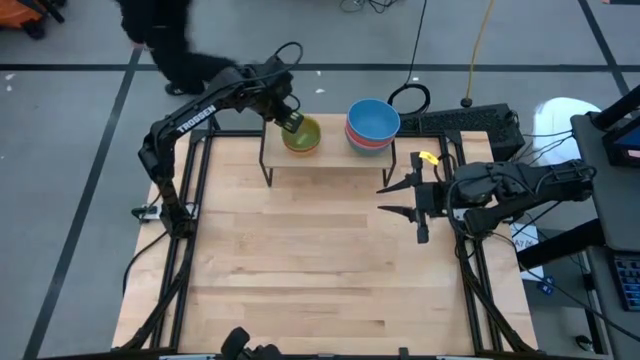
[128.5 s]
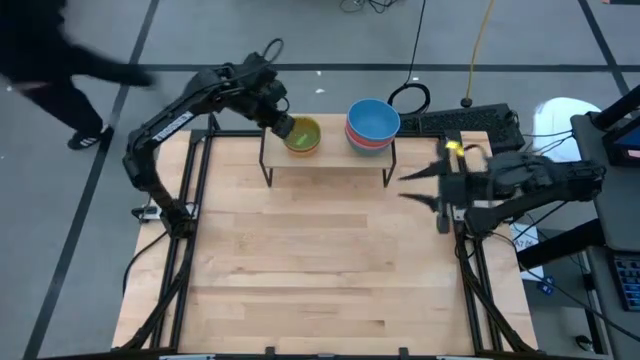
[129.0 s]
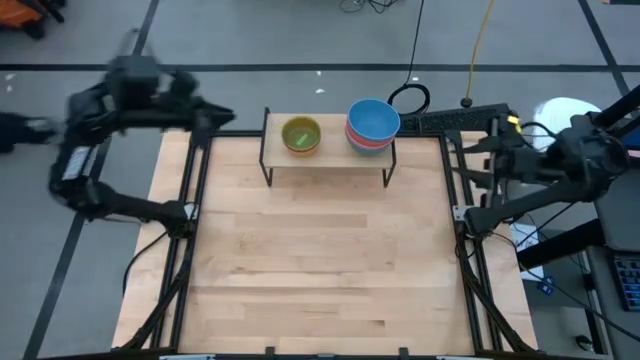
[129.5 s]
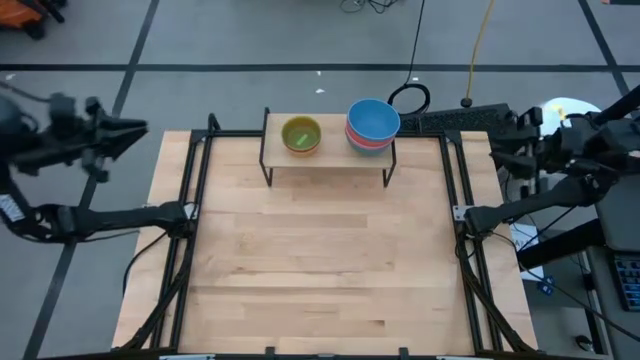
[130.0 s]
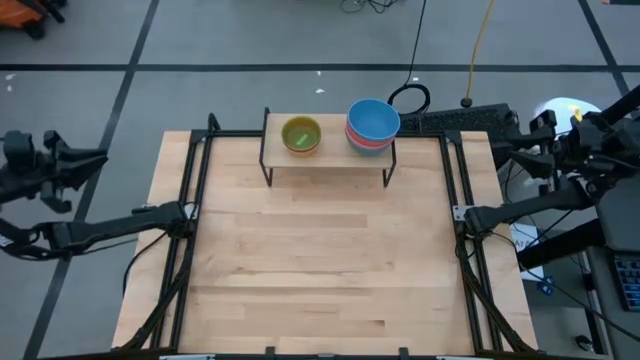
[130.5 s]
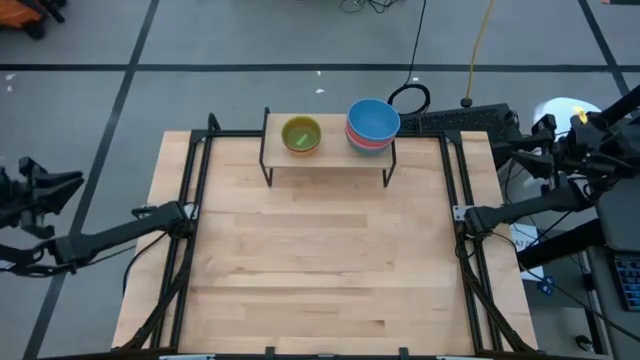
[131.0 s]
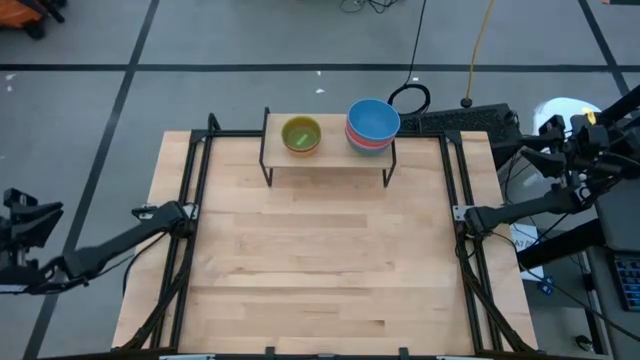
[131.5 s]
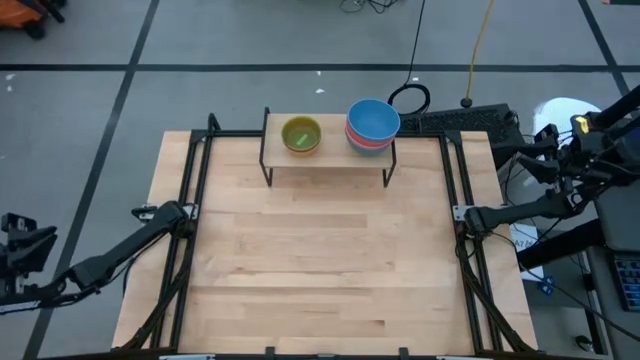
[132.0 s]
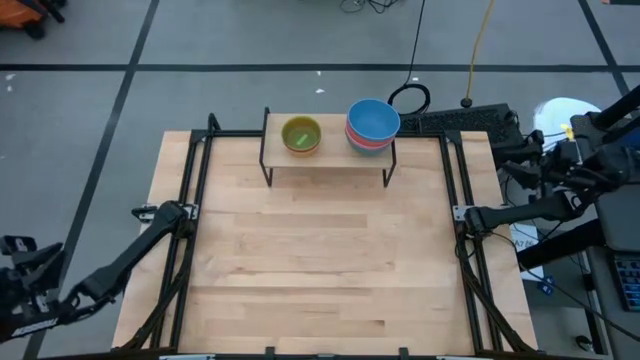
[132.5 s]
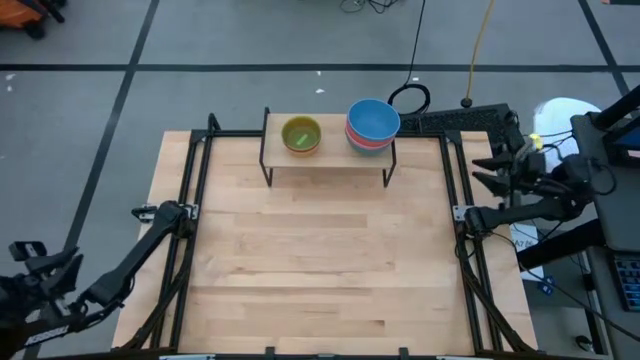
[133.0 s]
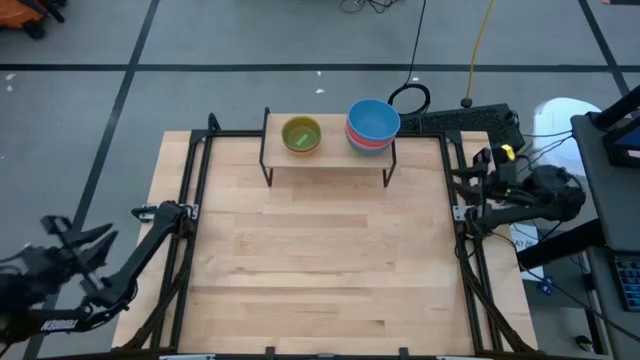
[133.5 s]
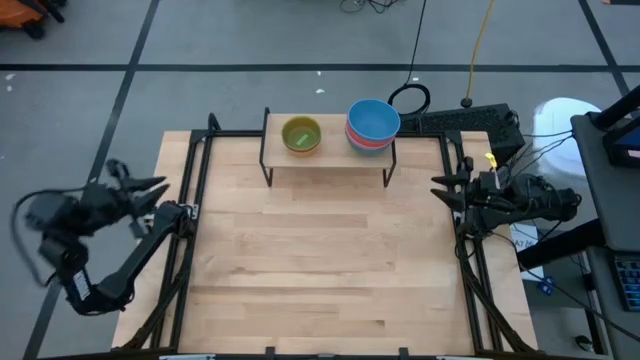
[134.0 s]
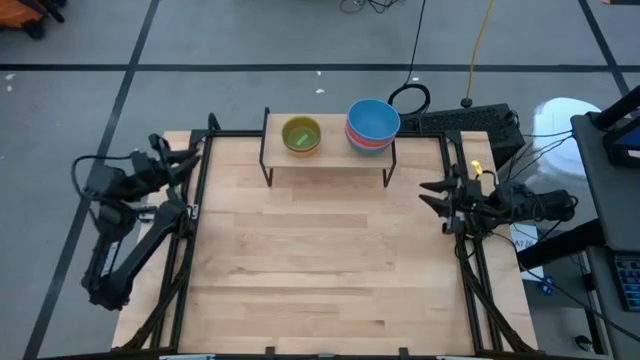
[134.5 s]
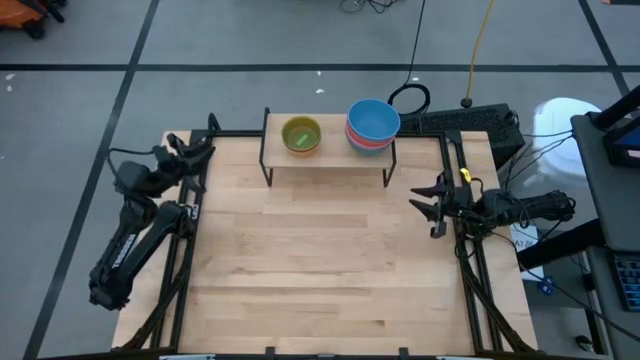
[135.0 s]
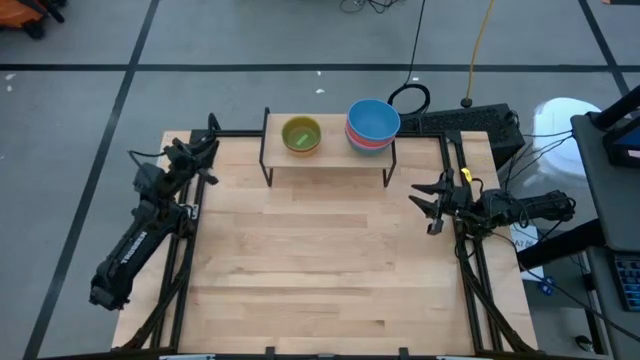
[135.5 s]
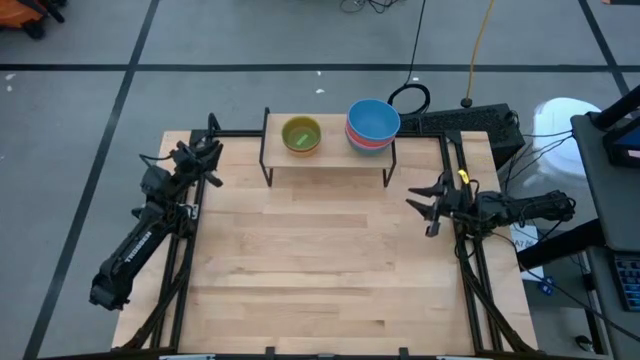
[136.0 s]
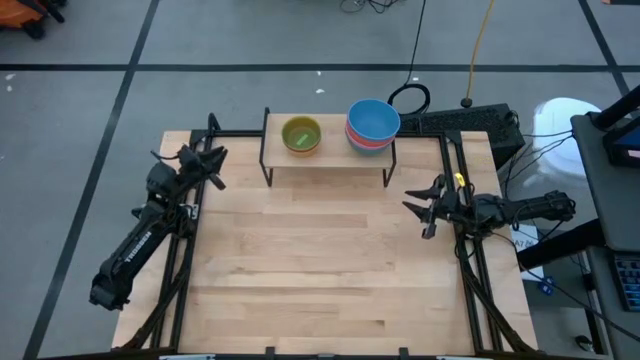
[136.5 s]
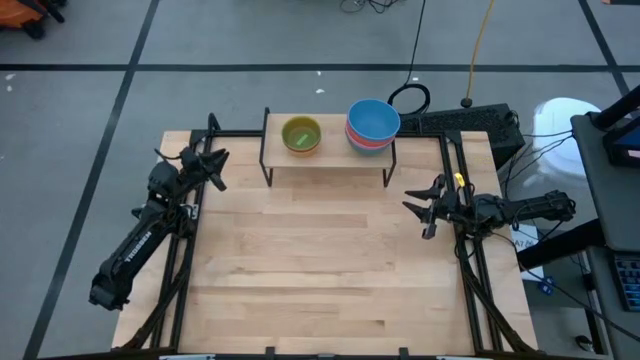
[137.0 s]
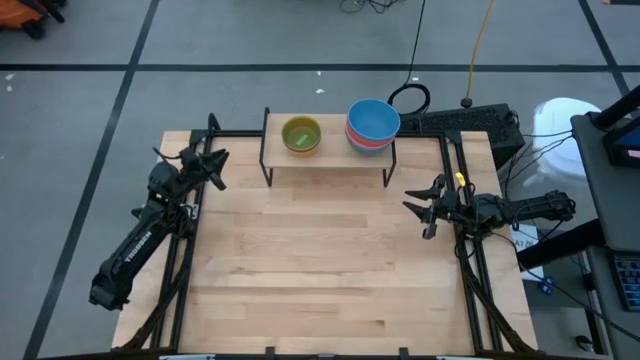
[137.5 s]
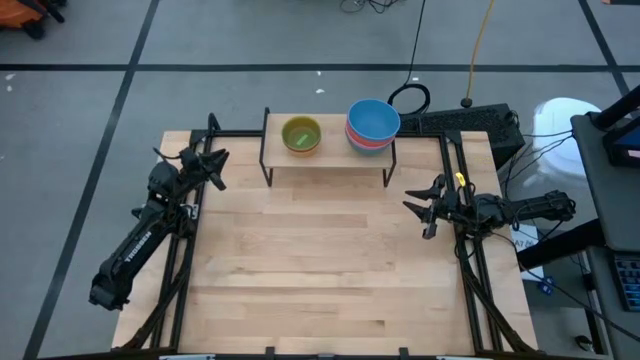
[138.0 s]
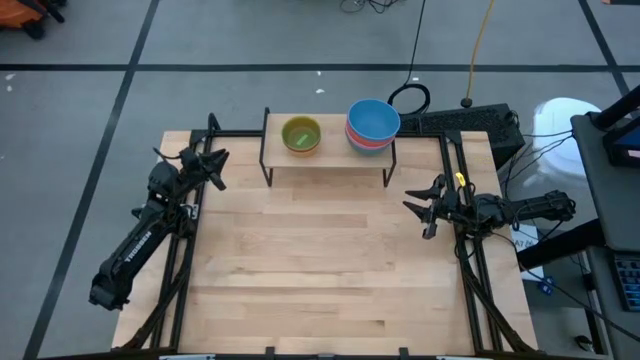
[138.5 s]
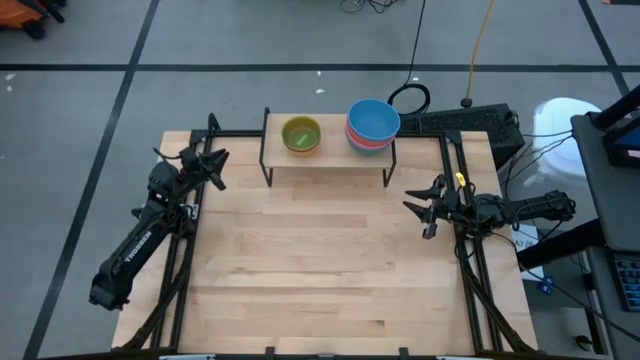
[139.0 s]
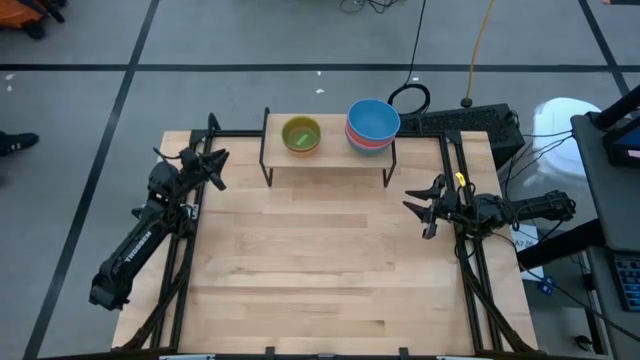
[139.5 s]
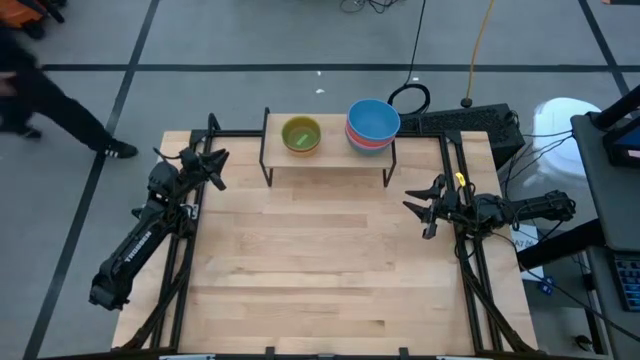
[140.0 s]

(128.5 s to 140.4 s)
Task: Place and stack bowls onto a shelf
Return to Home Position

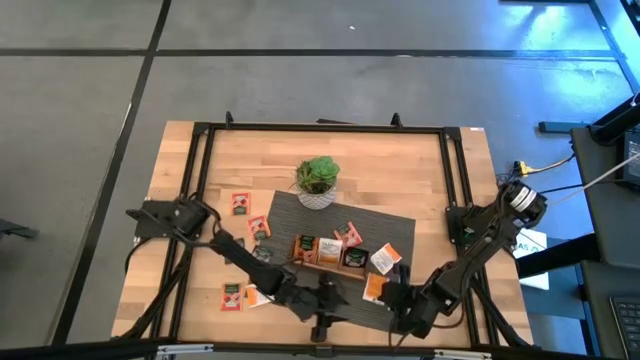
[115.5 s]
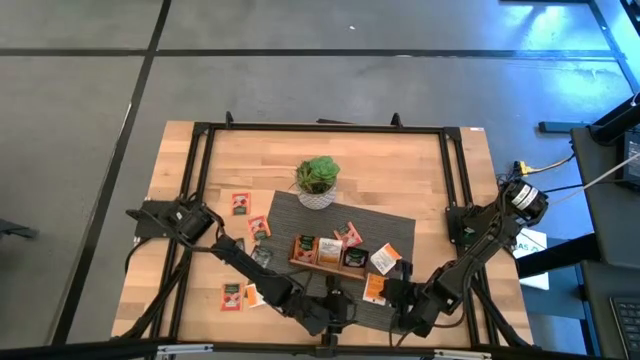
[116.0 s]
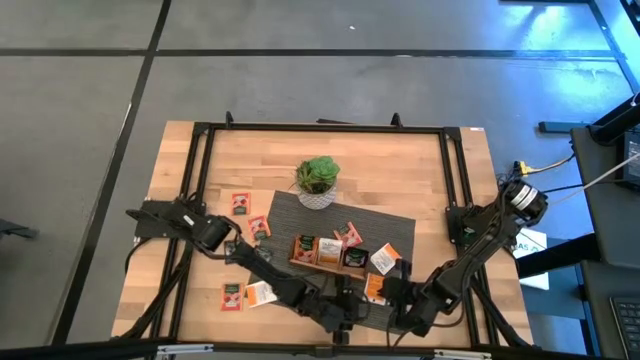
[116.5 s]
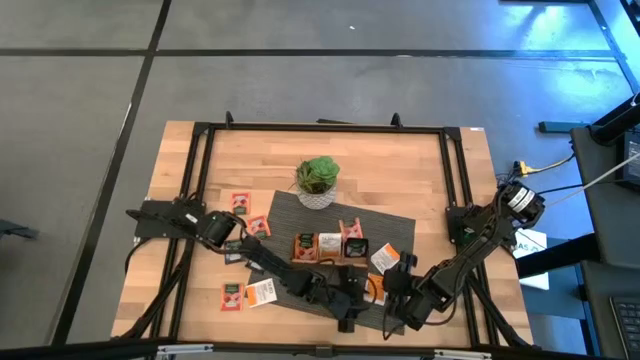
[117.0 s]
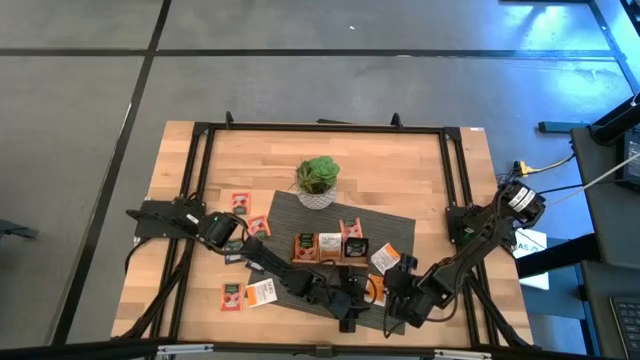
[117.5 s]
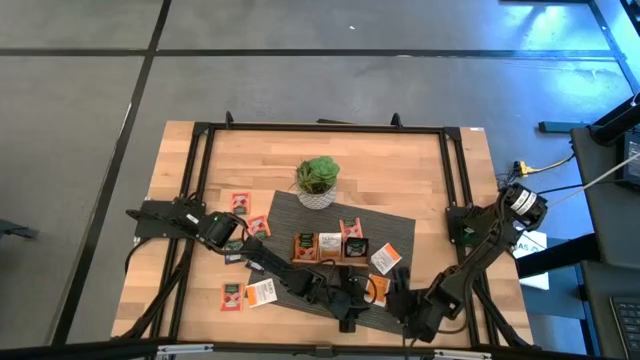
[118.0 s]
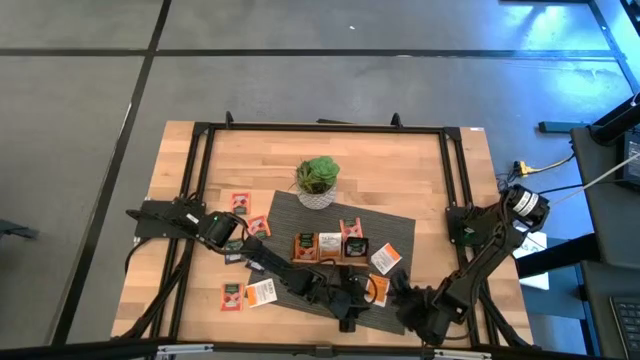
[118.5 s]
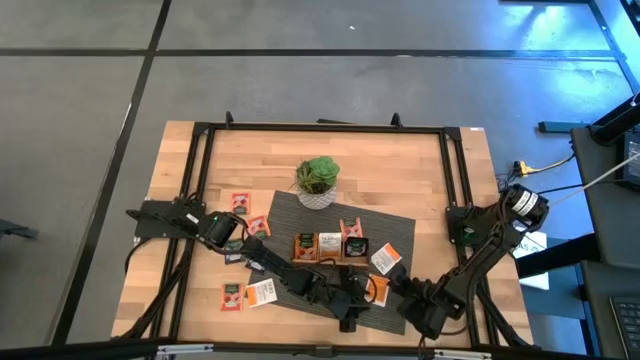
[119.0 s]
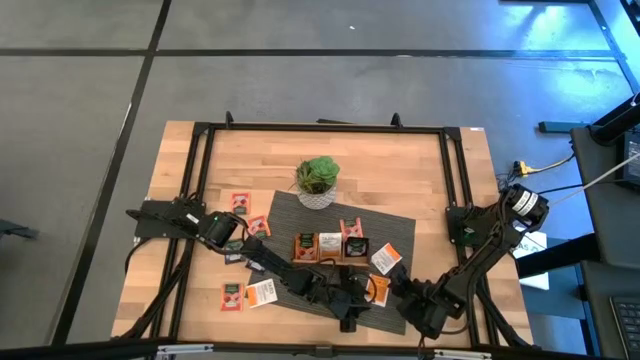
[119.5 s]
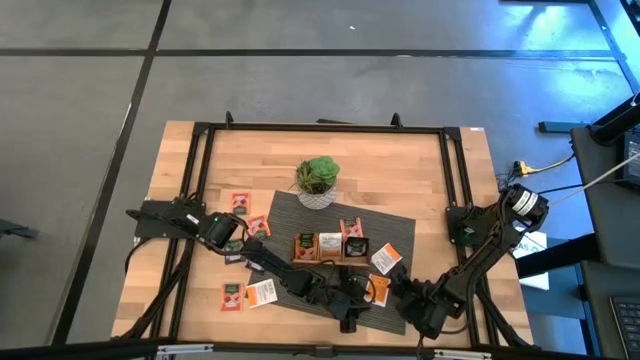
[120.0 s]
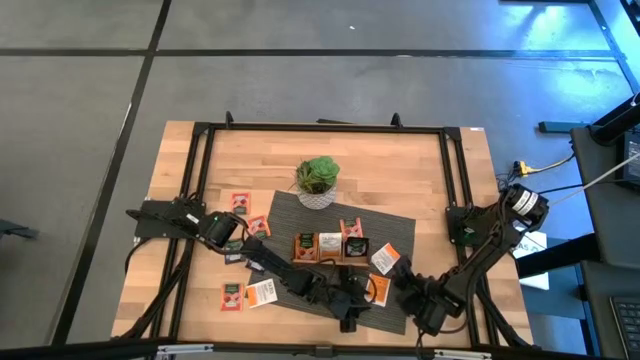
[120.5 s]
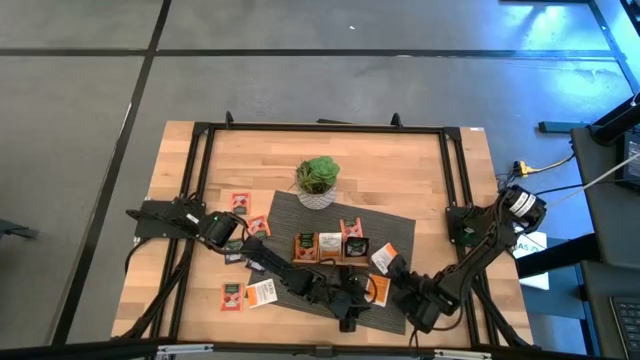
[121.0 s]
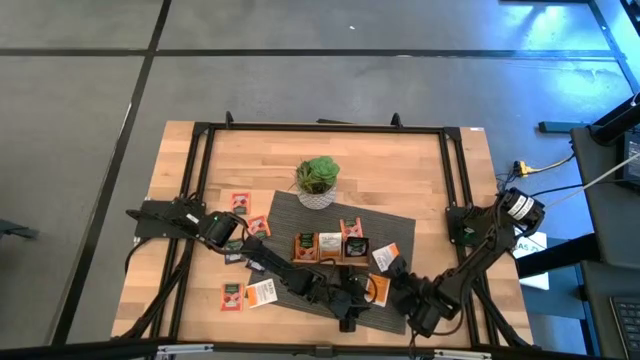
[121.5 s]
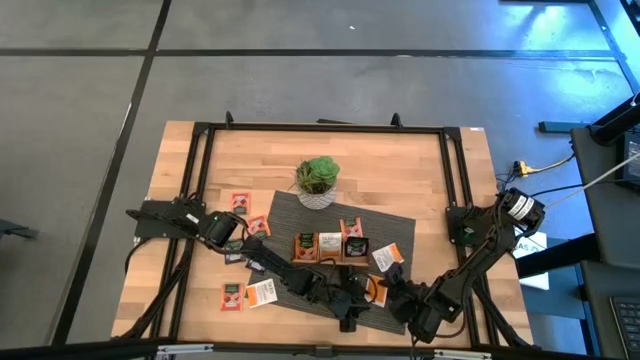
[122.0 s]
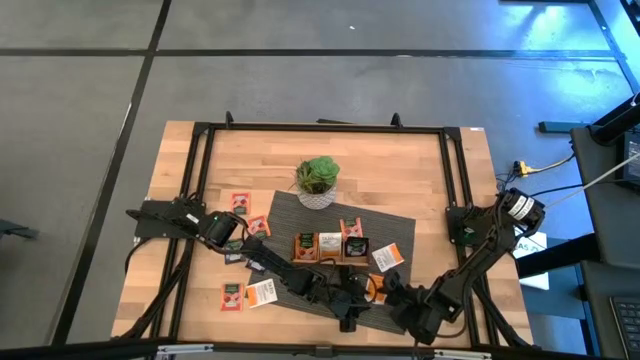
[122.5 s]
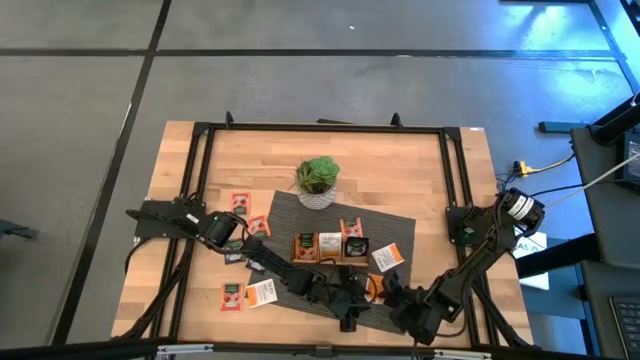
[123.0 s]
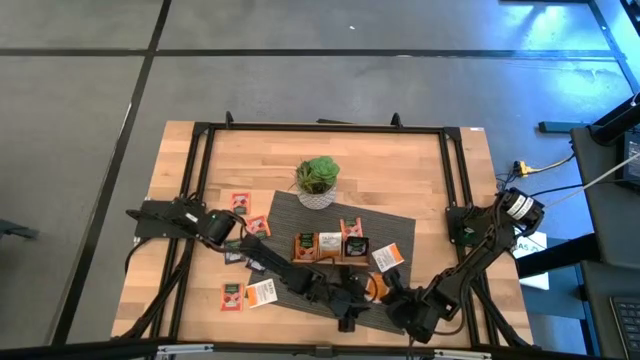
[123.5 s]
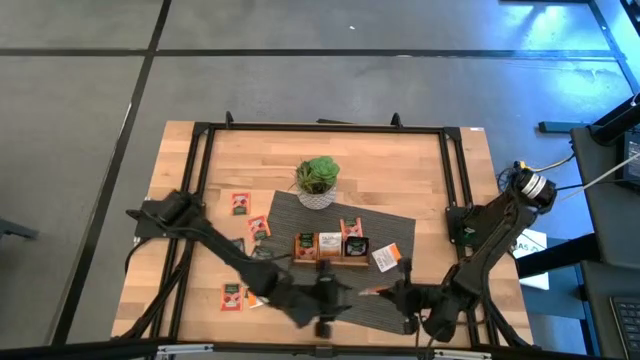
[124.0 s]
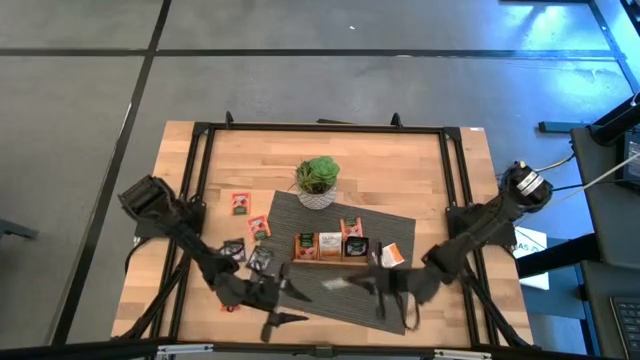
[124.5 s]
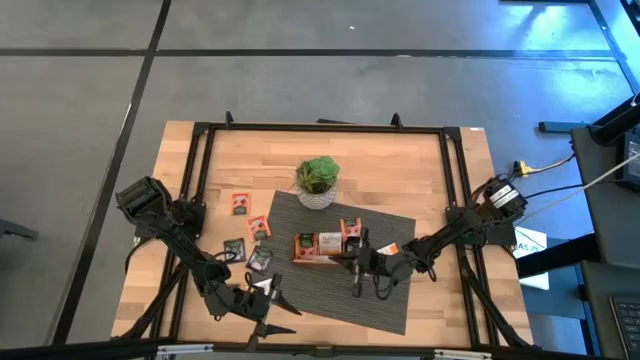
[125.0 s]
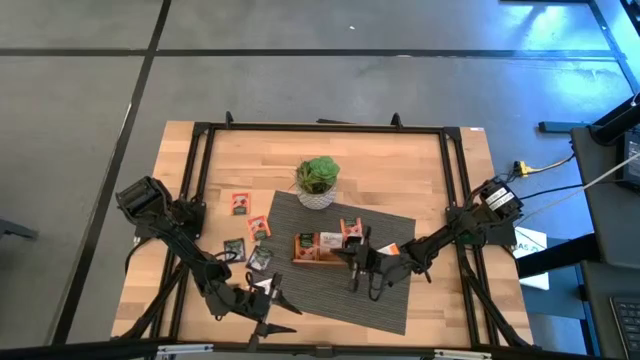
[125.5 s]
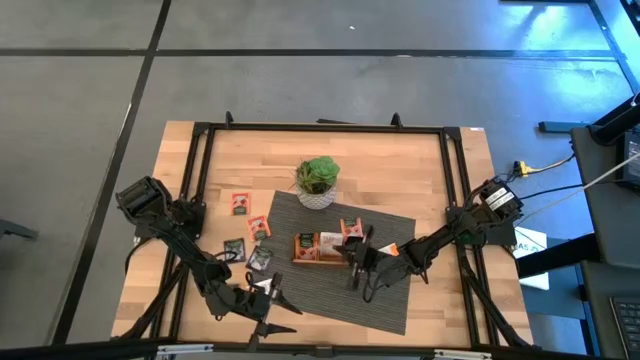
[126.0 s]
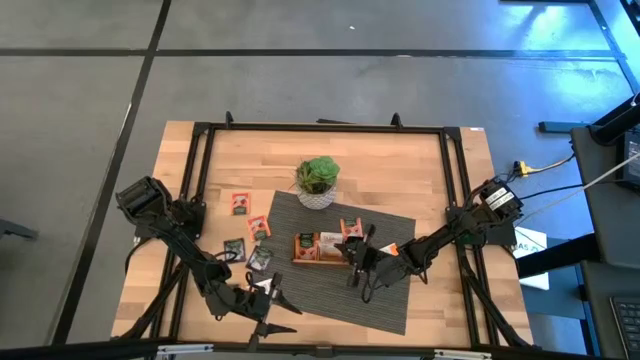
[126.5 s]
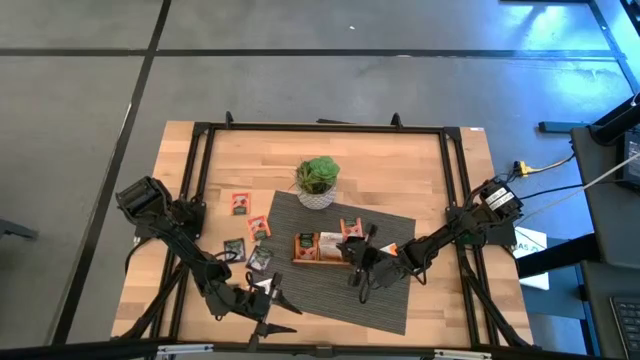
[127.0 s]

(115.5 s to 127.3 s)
Task: Pick & Place Tea
Put the white tea bag into the middle of the wooden organizer
